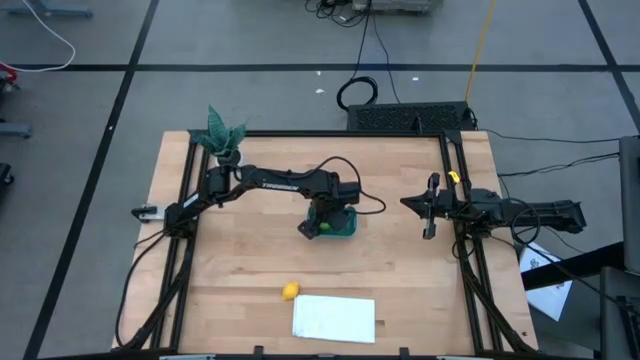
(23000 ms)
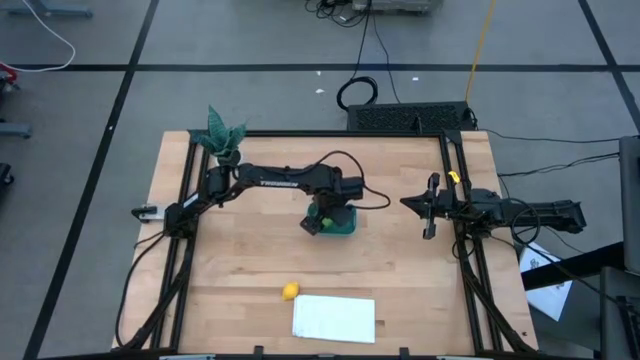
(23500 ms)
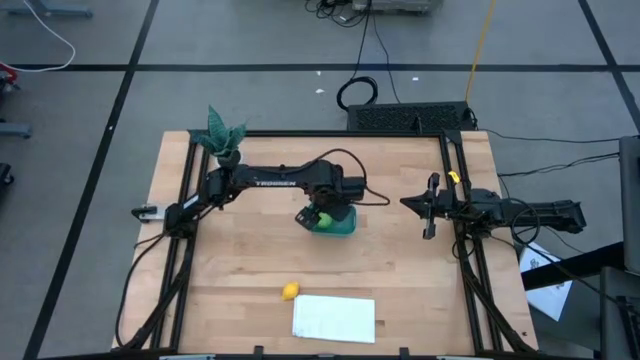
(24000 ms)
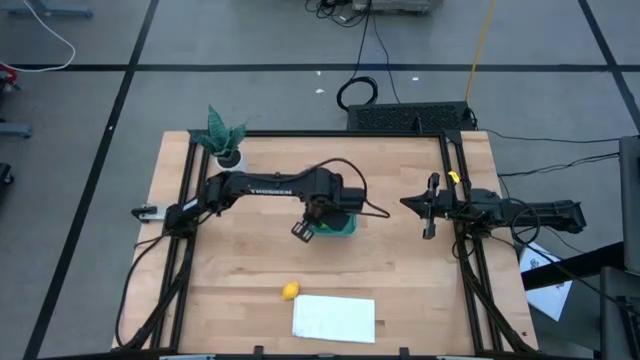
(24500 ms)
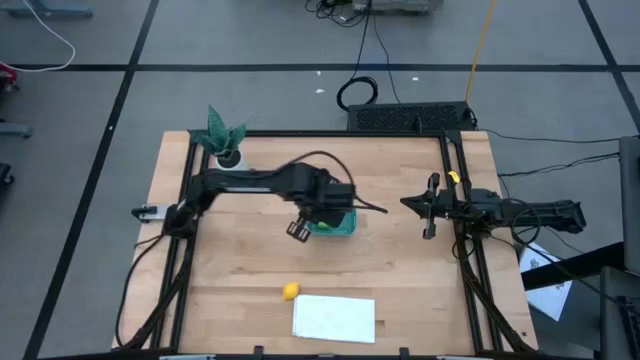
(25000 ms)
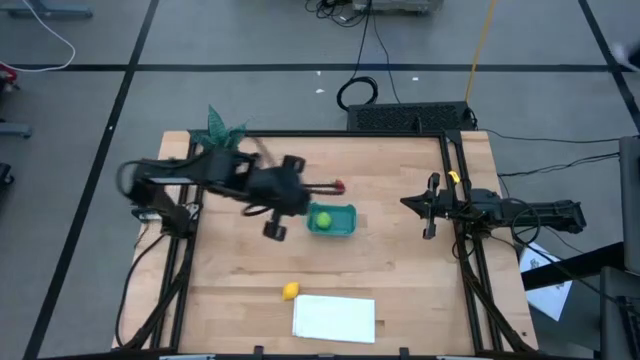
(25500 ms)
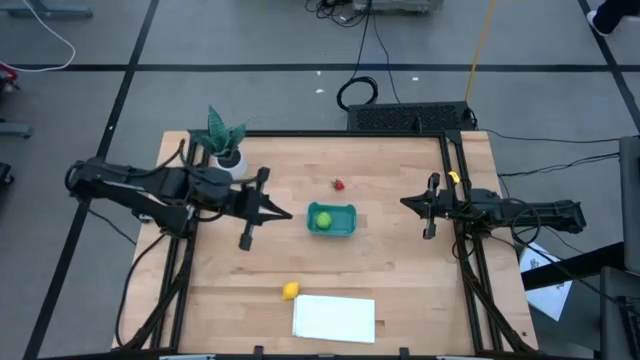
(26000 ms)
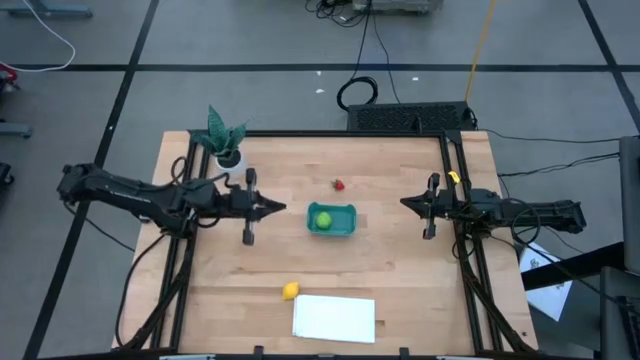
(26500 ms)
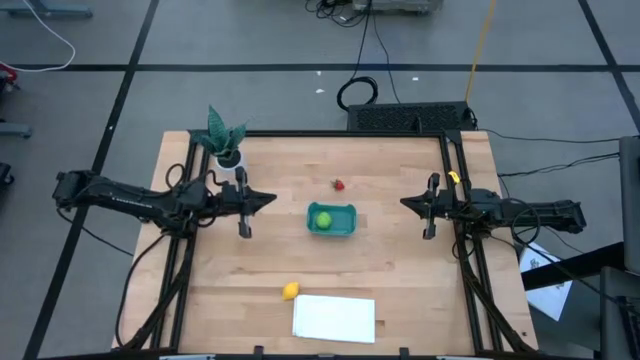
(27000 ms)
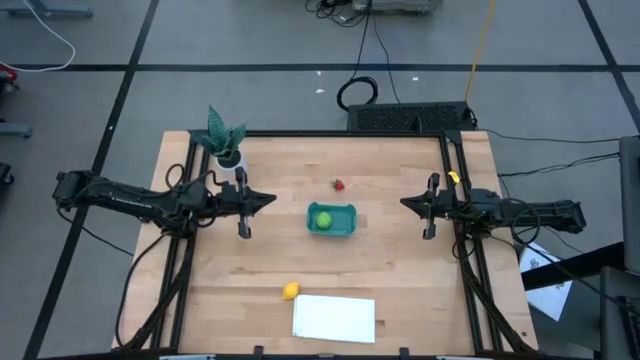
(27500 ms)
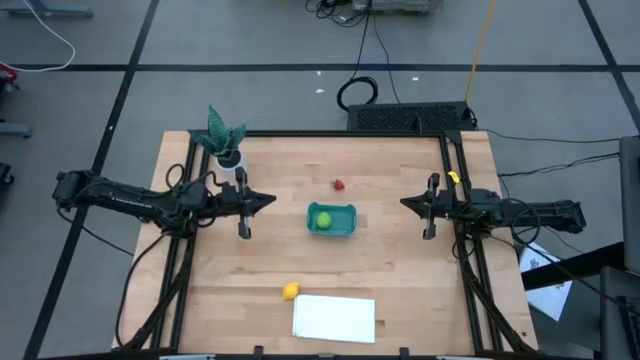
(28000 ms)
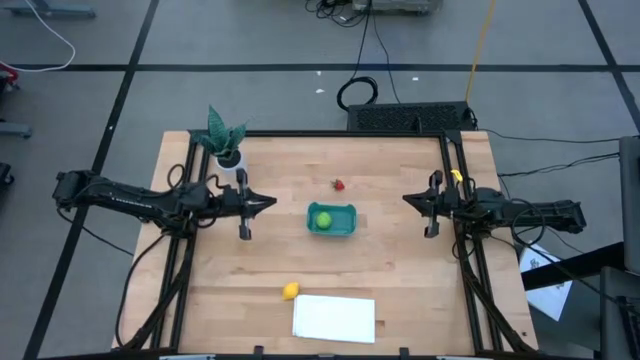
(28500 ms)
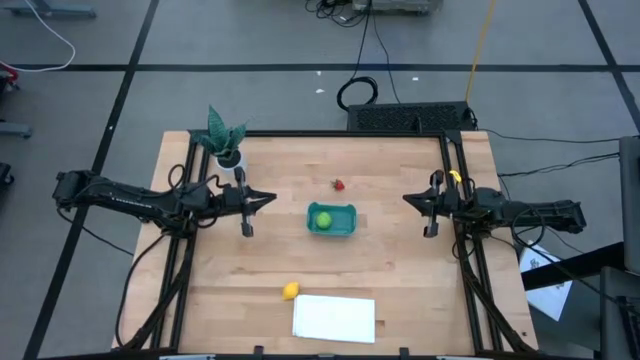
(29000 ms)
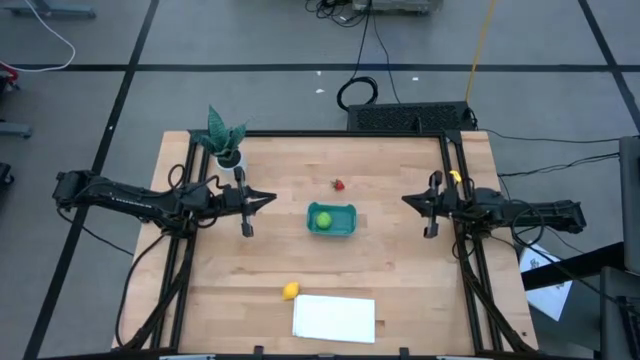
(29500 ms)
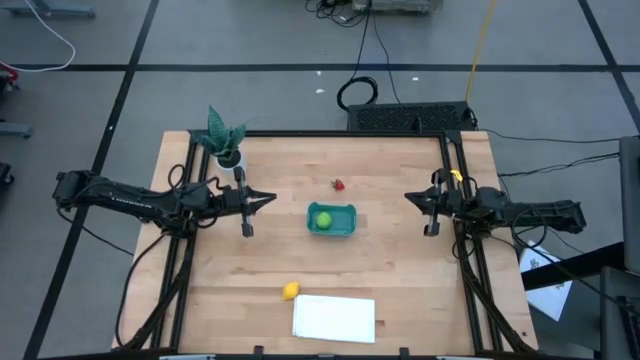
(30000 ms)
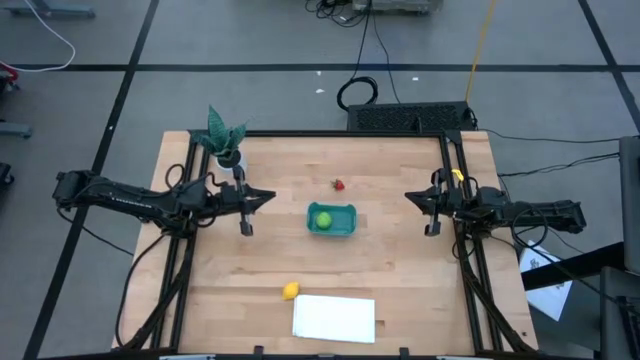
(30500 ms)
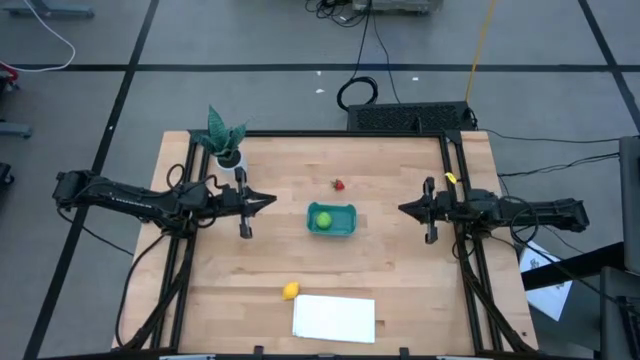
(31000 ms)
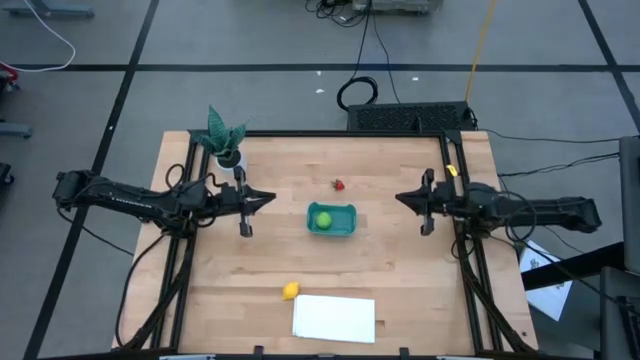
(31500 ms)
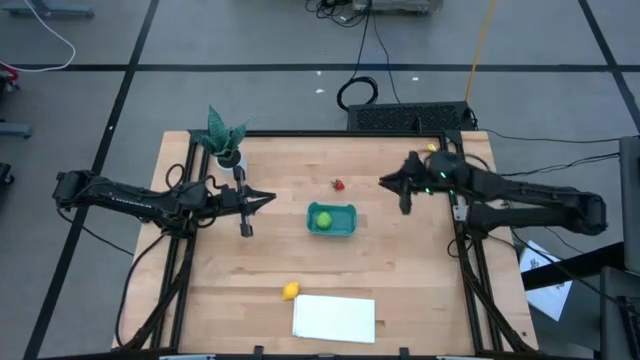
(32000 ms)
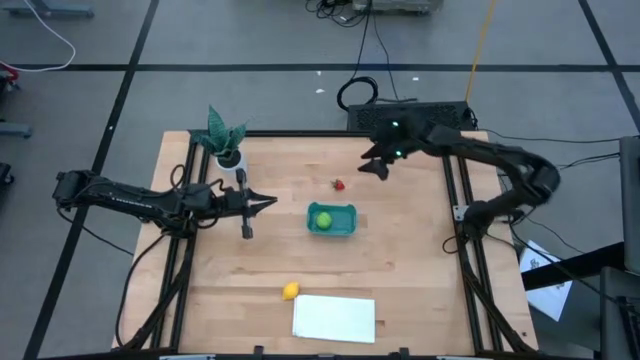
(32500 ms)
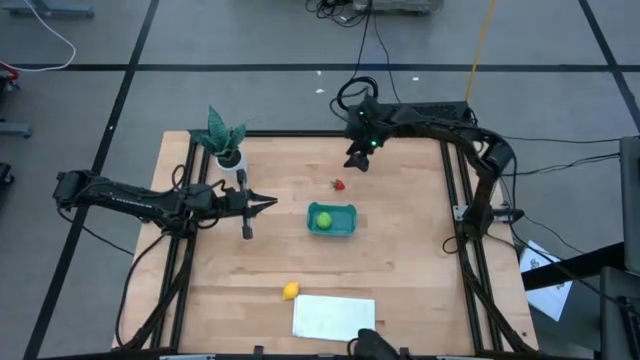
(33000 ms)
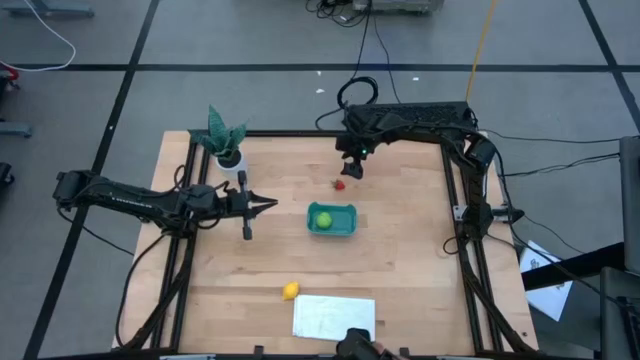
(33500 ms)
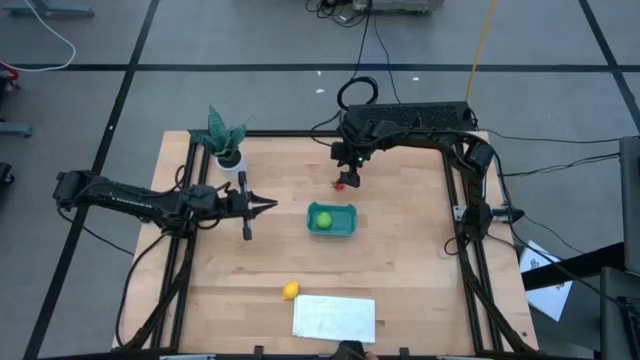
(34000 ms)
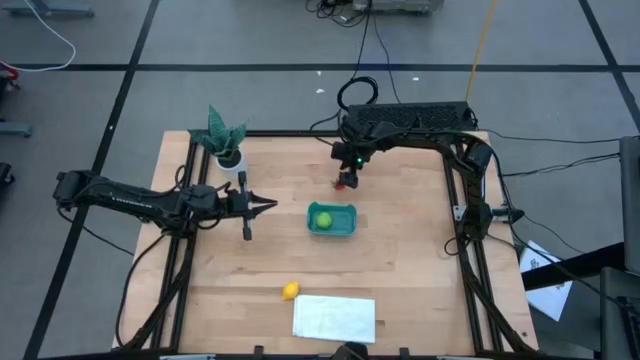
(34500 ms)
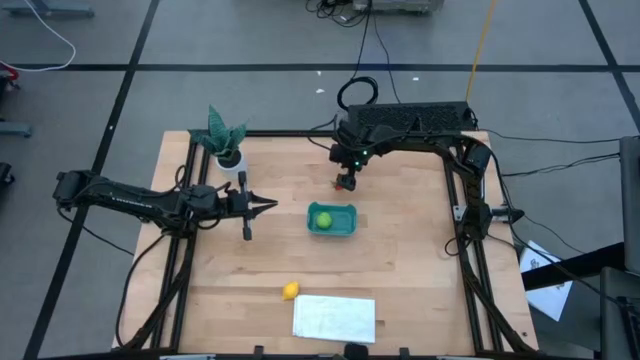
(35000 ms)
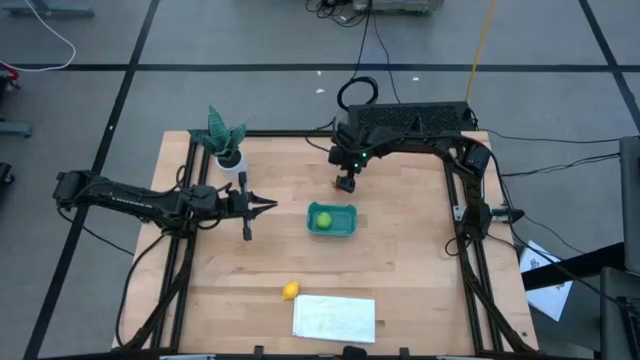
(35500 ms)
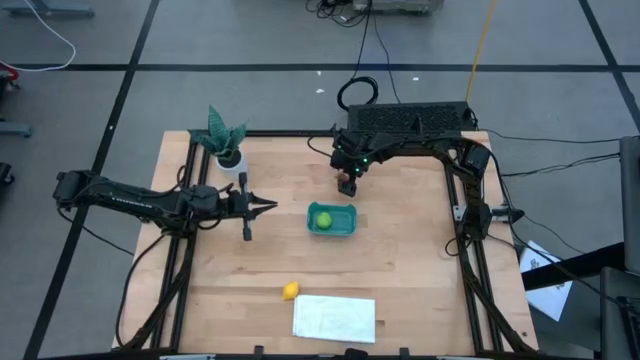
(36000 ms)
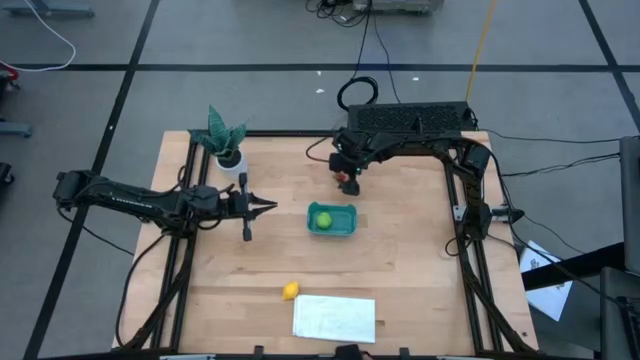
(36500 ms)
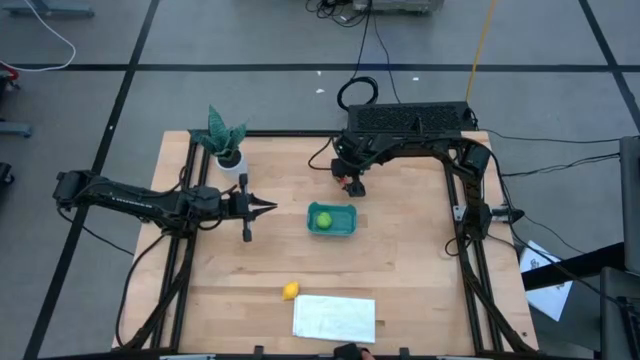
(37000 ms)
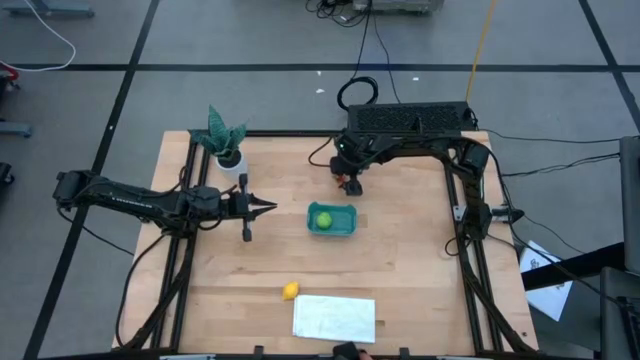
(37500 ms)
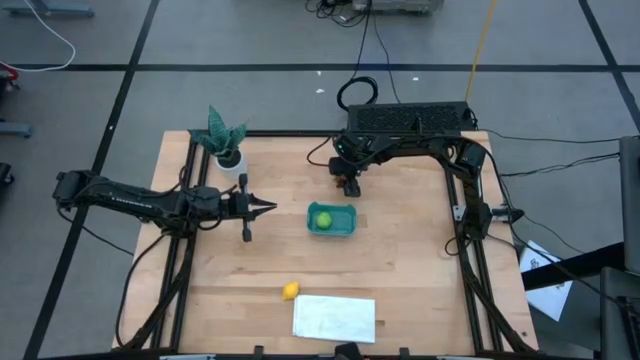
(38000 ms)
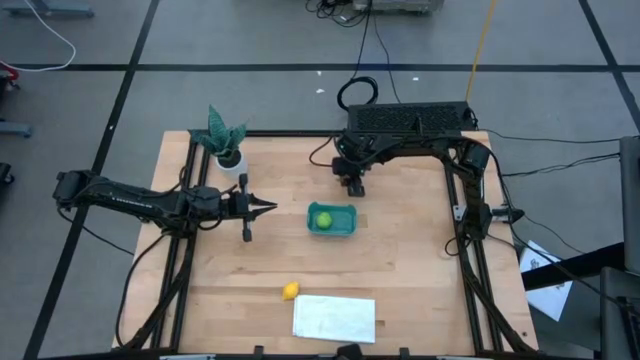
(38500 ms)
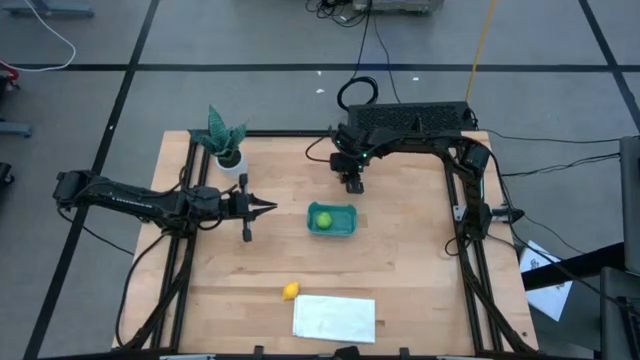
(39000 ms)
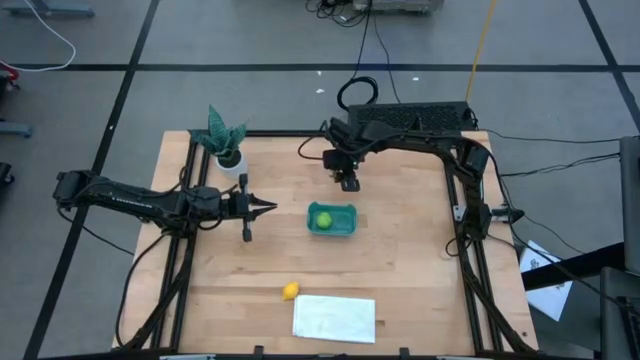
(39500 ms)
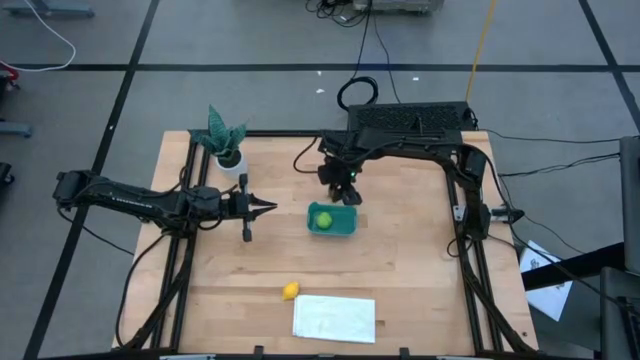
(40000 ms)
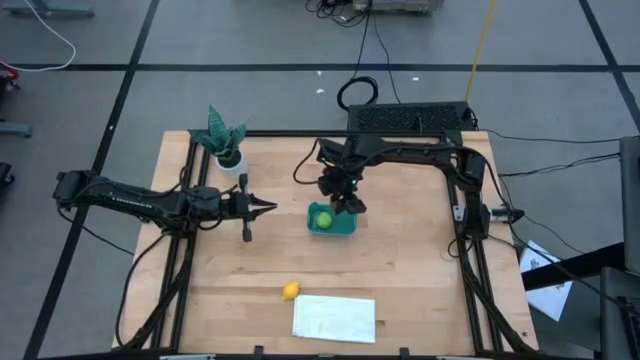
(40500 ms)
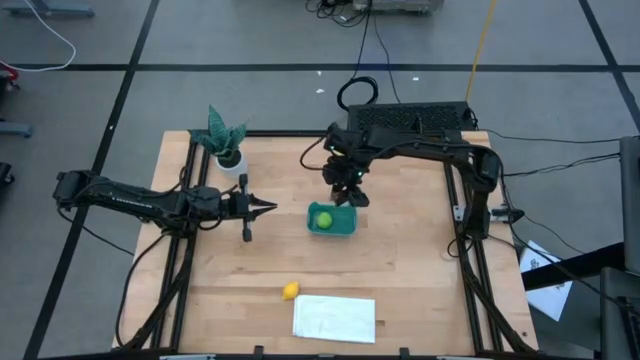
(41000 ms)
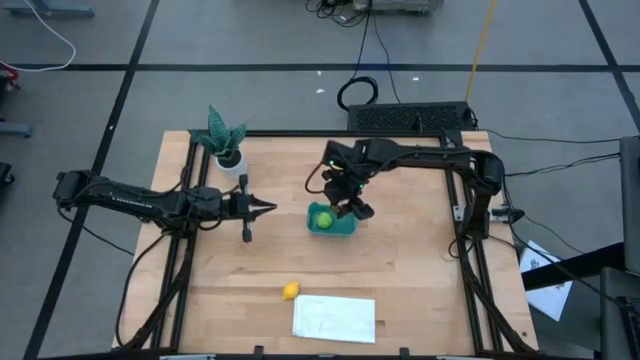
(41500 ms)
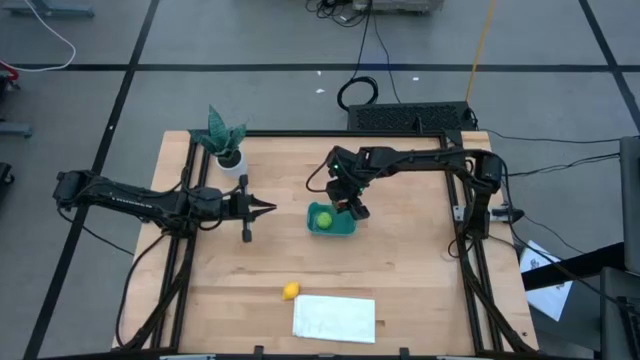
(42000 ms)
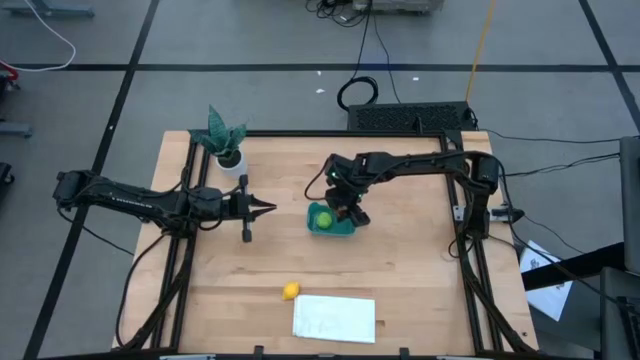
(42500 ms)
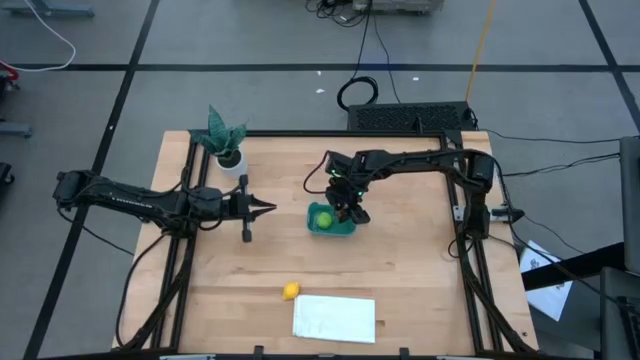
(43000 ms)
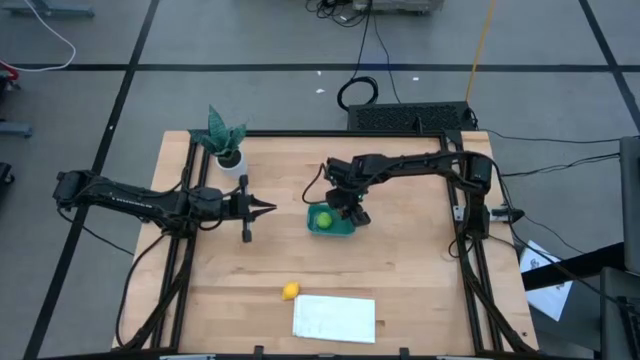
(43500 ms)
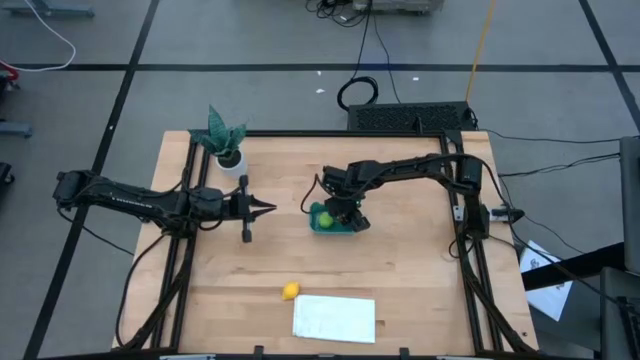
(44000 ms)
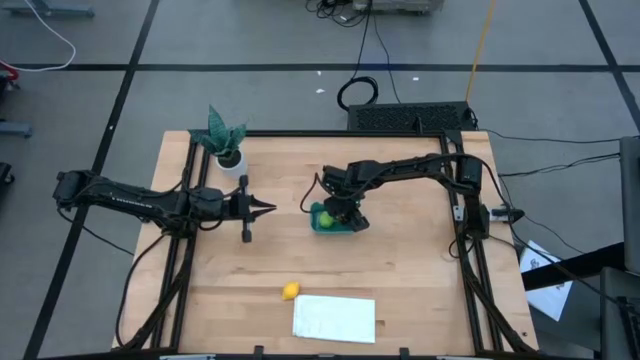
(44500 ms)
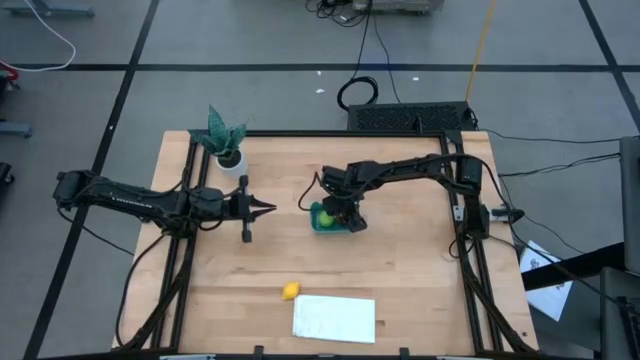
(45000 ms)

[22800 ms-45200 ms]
Task: Pick and placing Produce into tupperware
Put the red strawberry into the green bin
